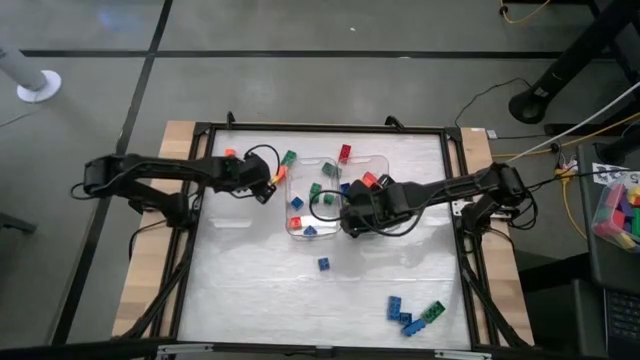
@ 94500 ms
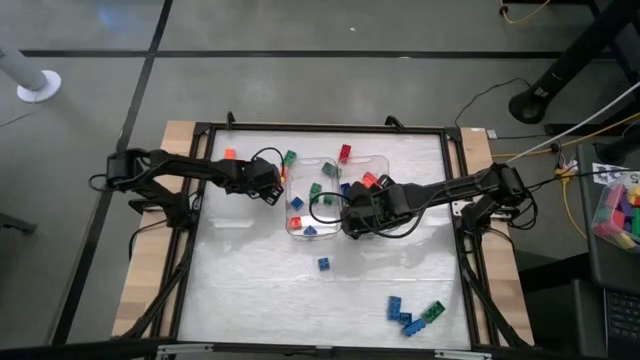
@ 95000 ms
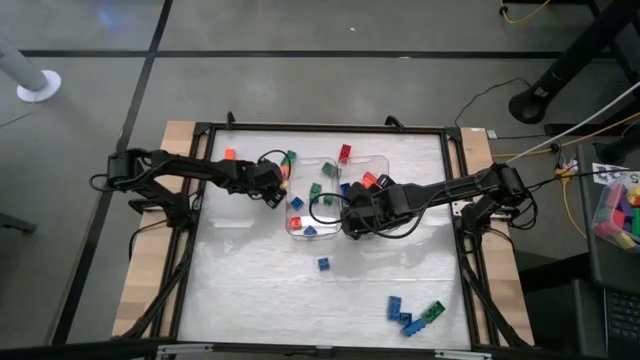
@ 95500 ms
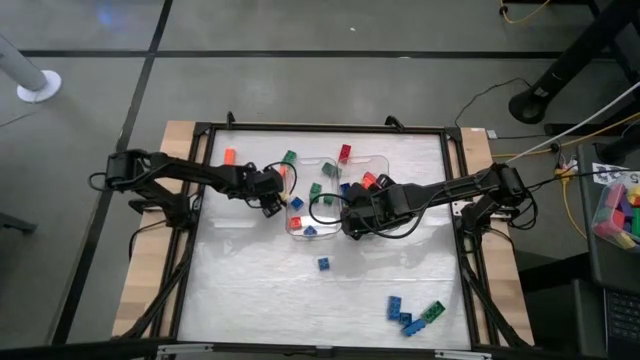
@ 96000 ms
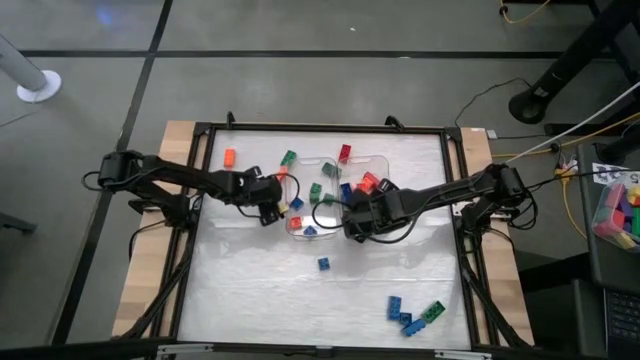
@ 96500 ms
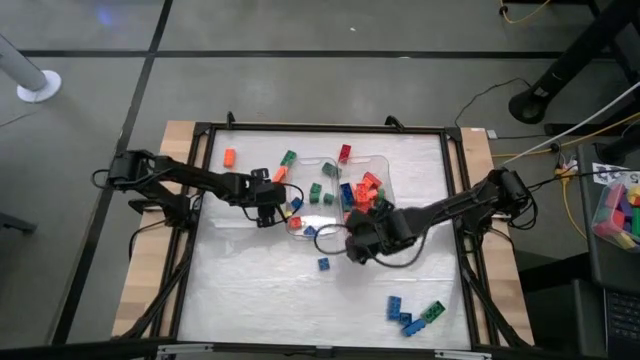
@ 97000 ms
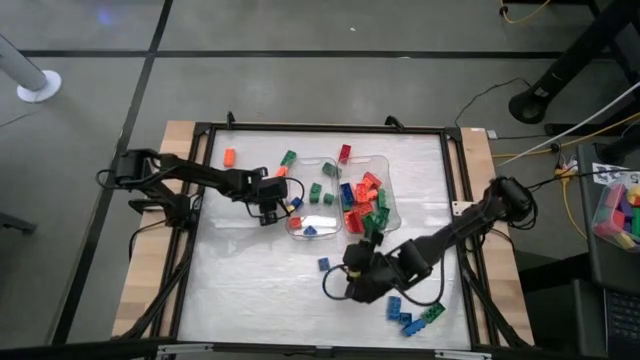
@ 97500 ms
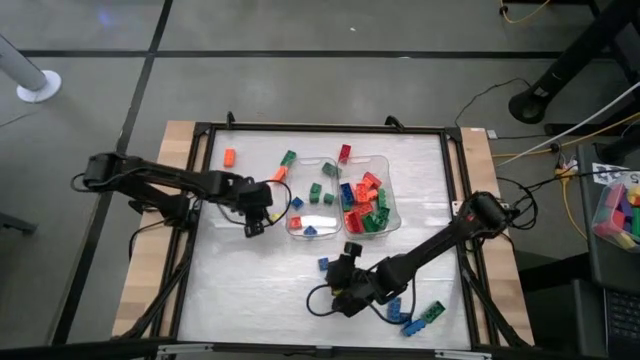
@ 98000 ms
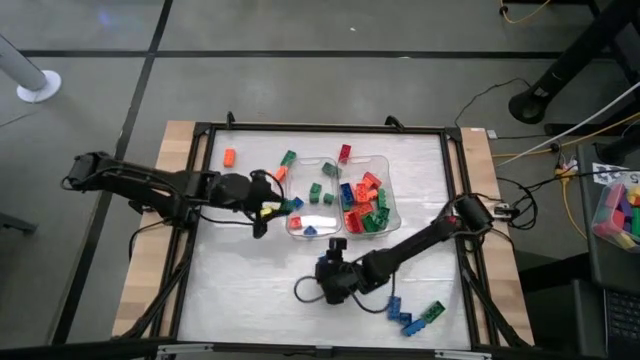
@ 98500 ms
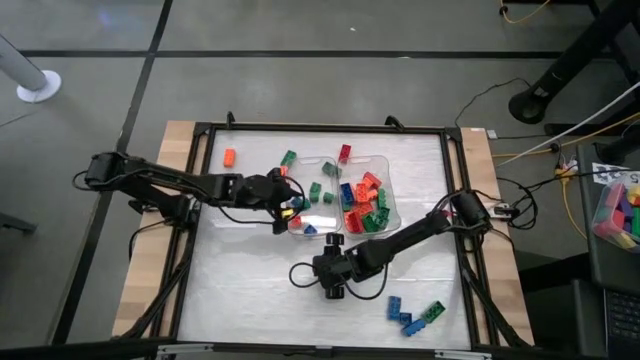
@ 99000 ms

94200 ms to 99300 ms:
Task: Sort blocks by size
Put the green square game piece into the left transparent bin

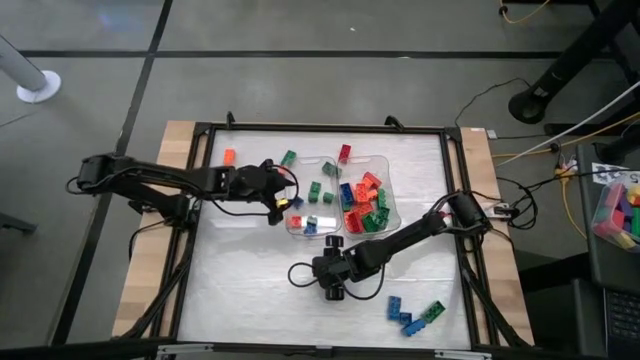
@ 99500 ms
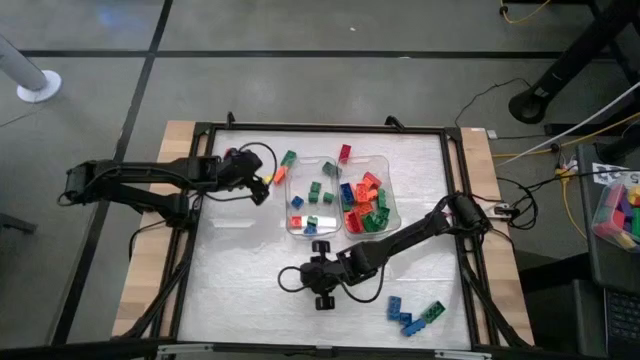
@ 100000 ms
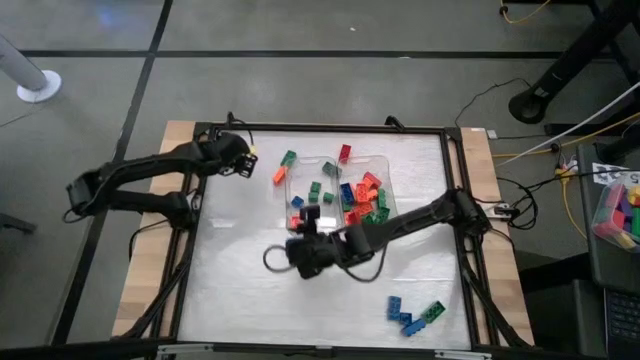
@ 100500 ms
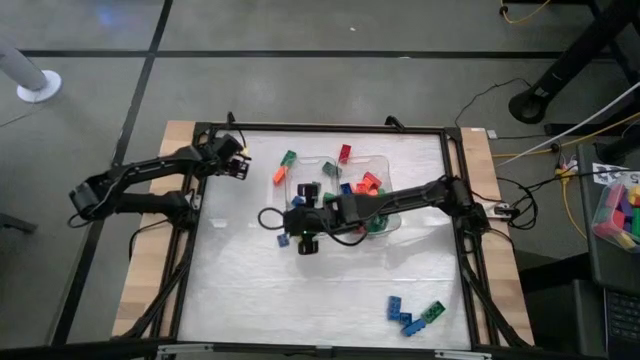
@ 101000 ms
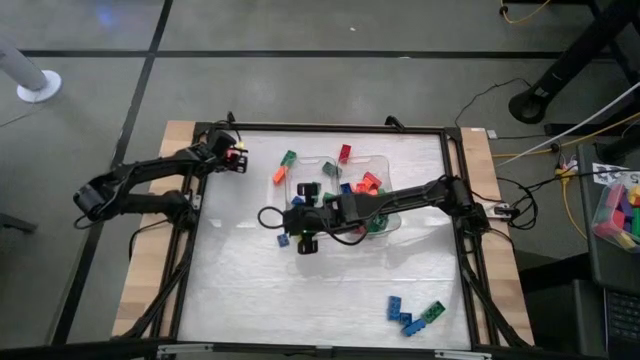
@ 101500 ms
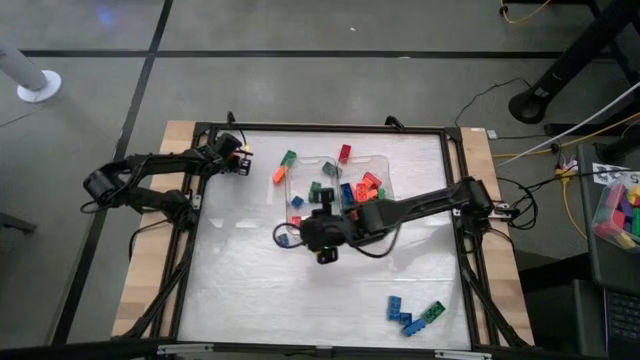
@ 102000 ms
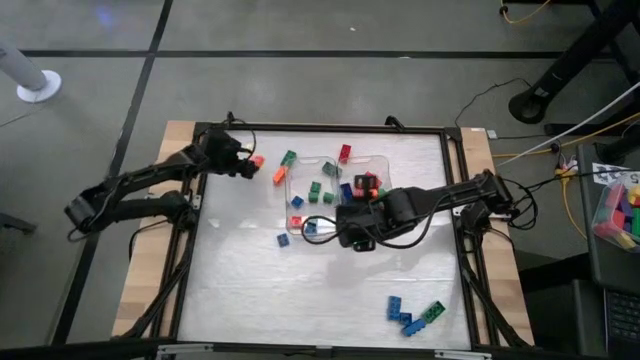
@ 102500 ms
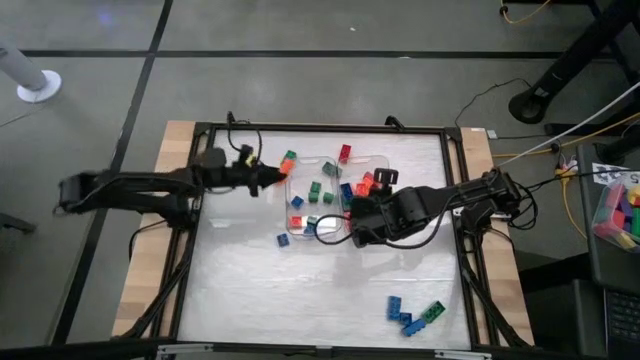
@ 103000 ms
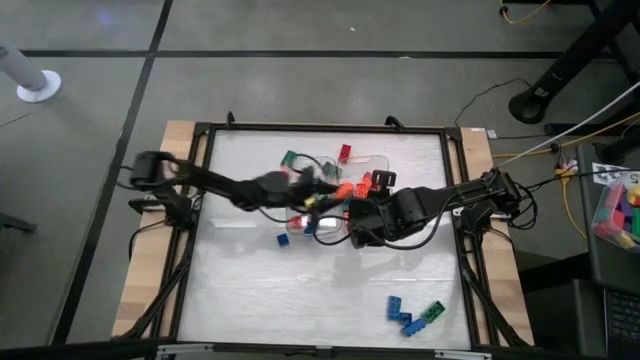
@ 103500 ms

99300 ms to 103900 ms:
Put the orange rectangular game piece into the right transparent bin

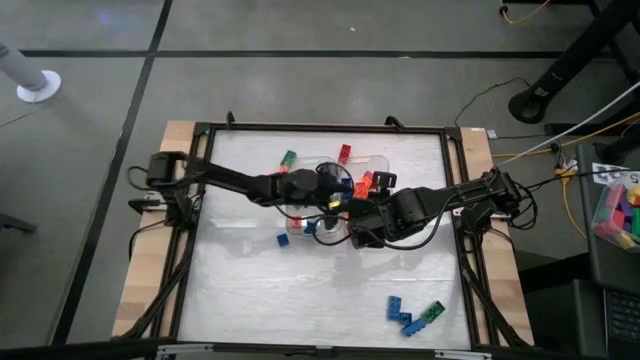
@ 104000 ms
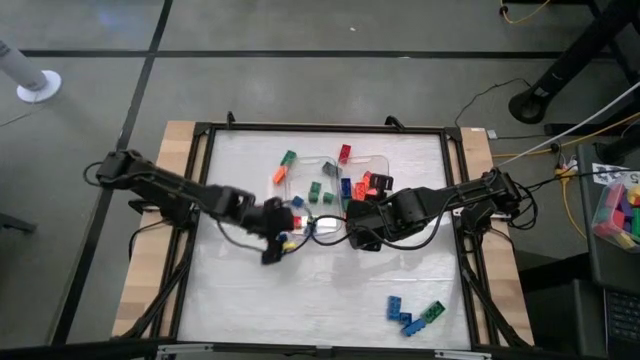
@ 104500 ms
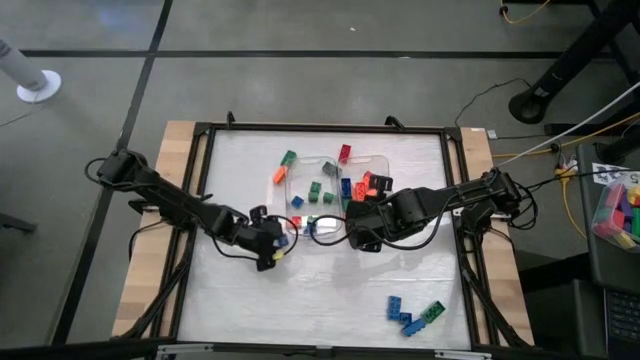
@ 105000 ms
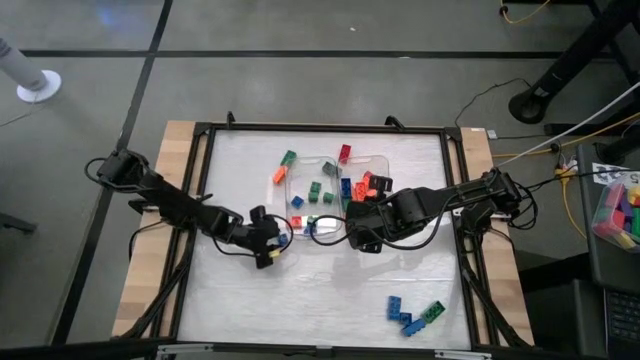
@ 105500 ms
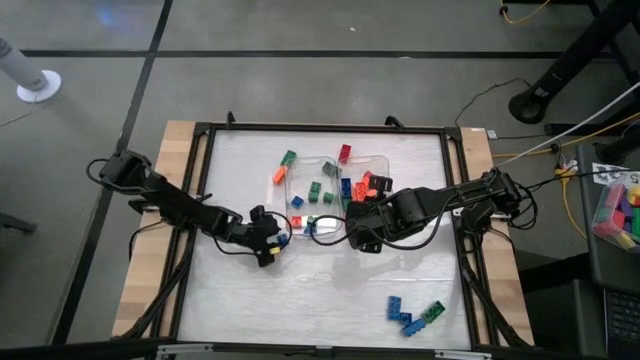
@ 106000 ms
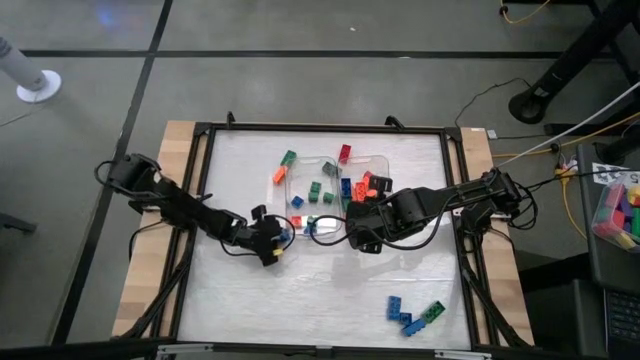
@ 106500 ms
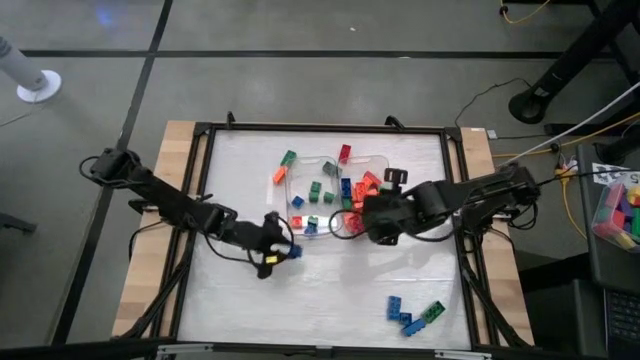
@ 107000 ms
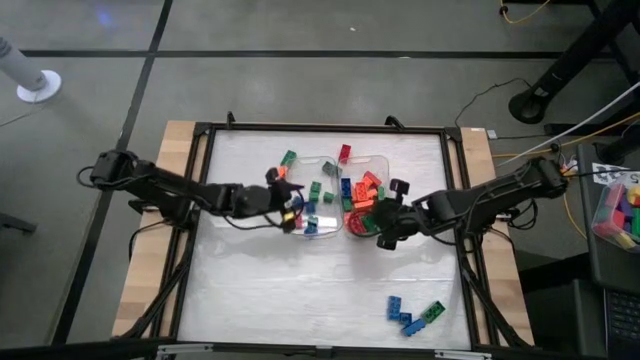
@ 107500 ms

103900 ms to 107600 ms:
Put the blue square game piece into the left transparent bin

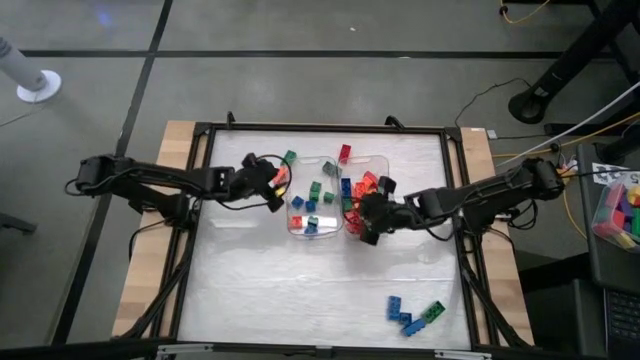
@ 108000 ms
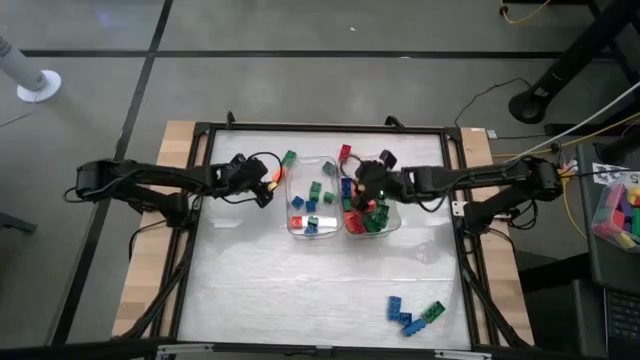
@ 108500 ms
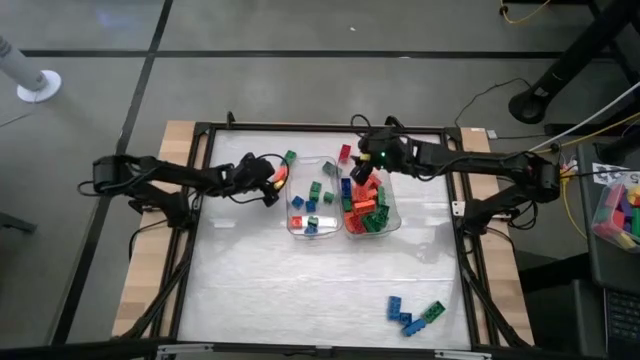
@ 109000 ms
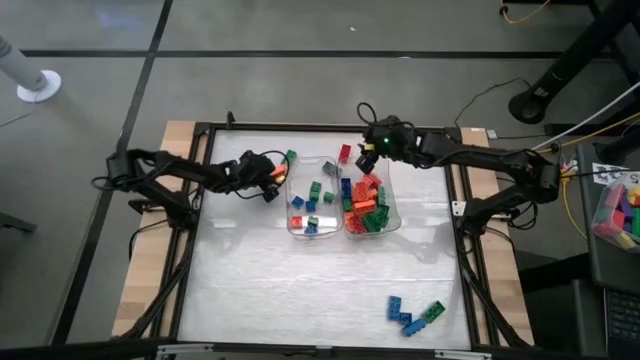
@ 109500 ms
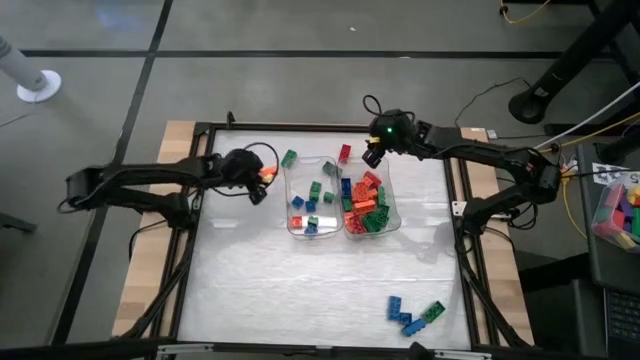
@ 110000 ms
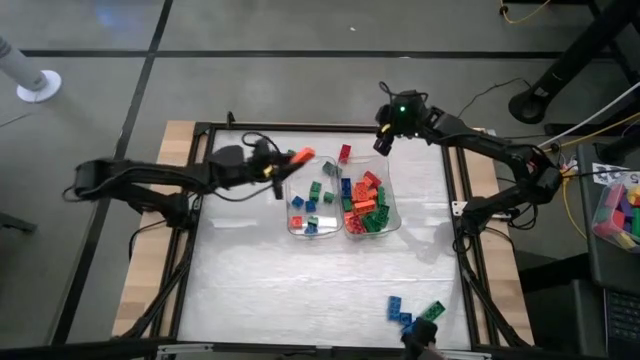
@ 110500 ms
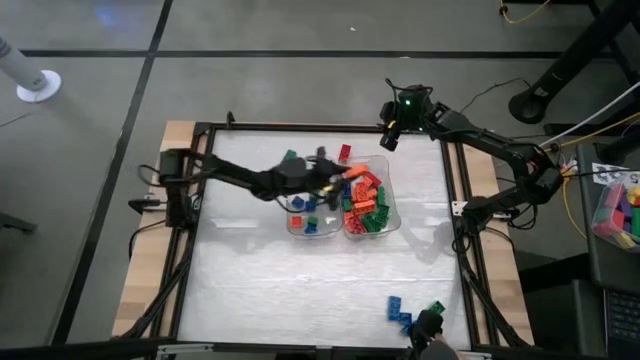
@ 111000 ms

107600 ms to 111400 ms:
Put the orange rectangular game piece into the right transparent bin

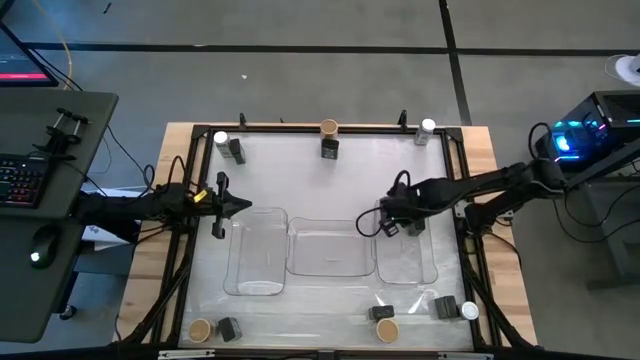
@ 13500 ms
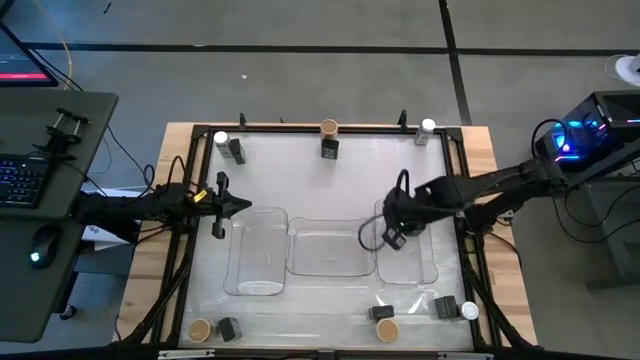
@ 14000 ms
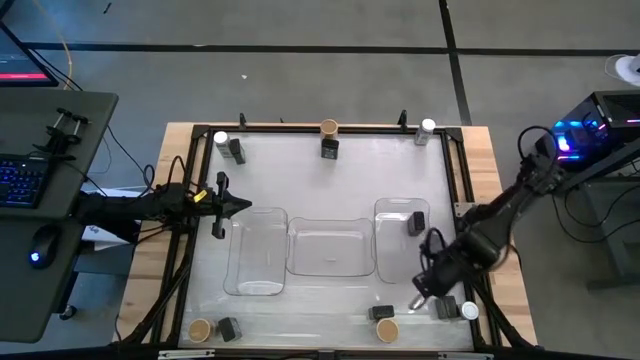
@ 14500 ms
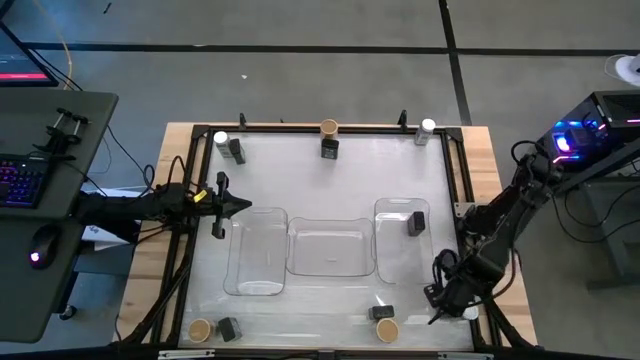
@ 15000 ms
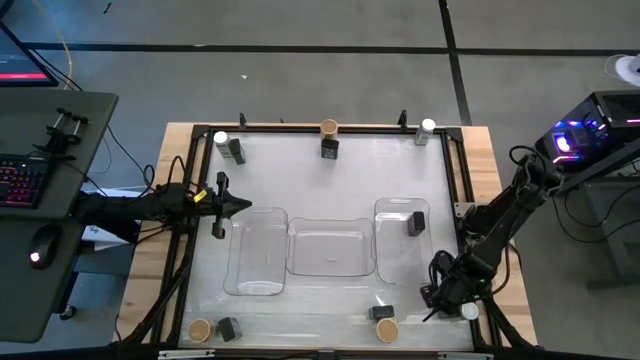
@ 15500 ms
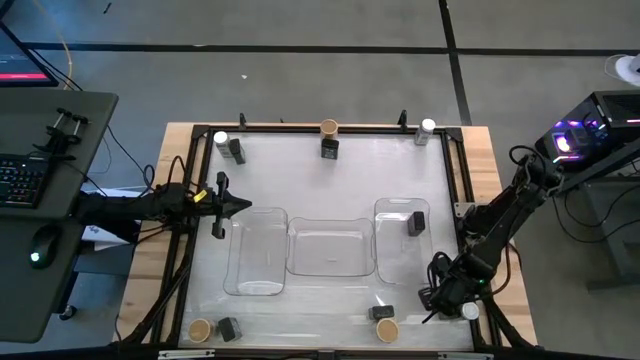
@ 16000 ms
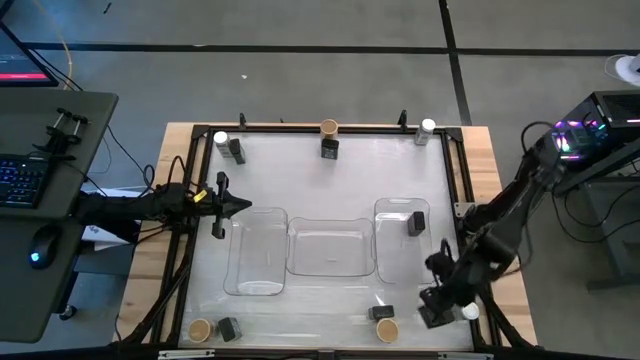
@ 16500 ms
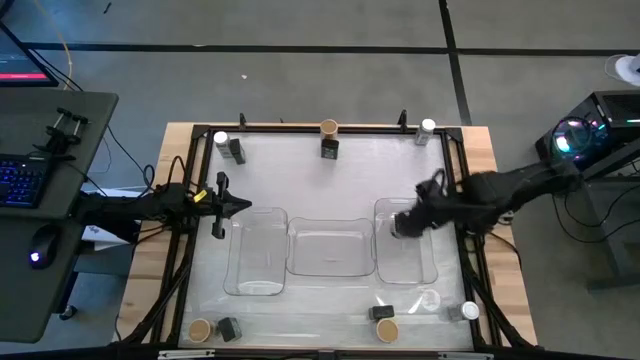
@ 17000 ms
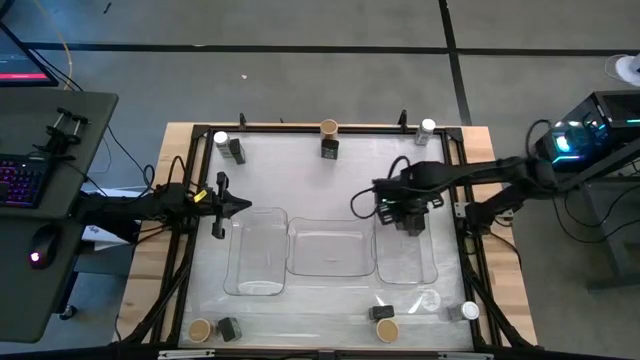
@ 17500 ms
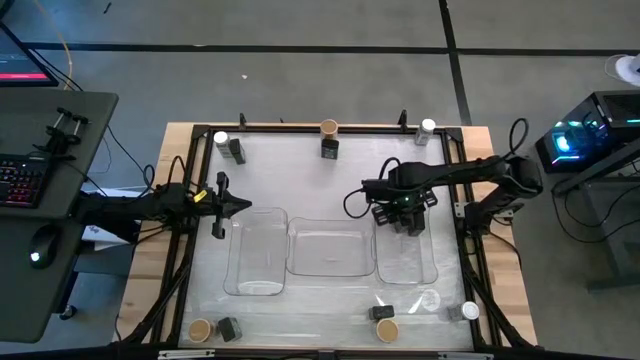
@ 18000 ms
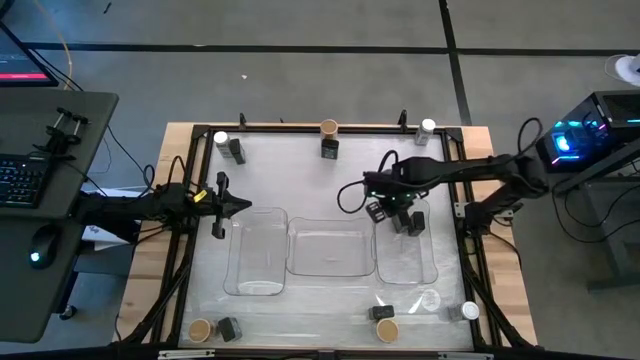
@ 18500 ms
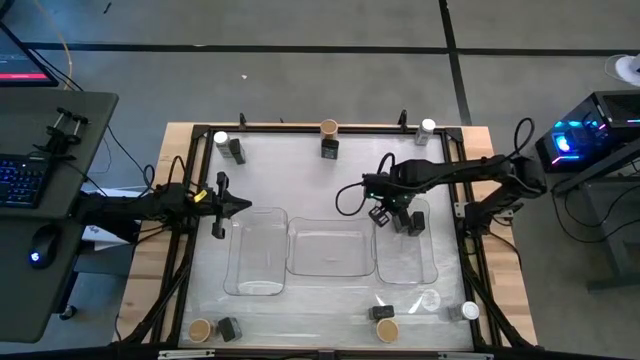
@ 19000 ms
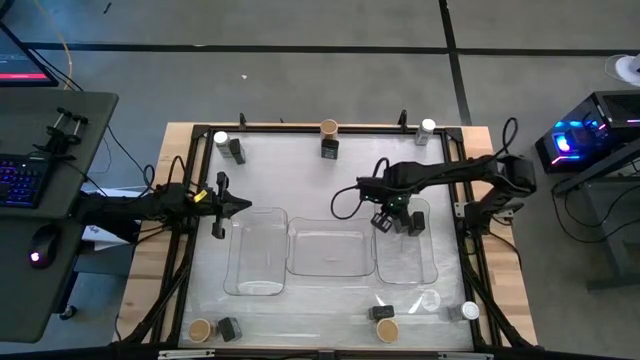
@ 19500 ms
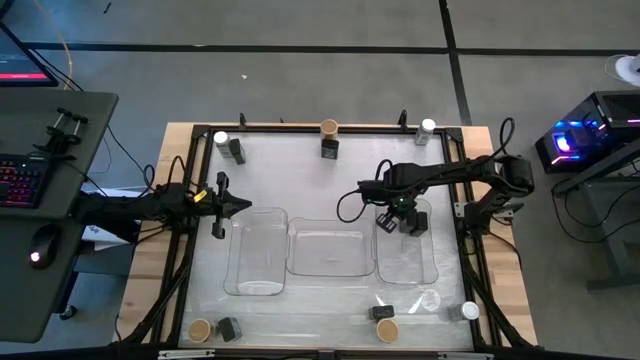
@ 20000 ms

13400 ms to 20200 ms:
Task: Sort spices by type
Put the black seasoning can into the right transparent bin aligned with the other black seasoning can
